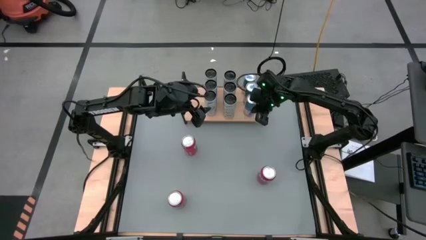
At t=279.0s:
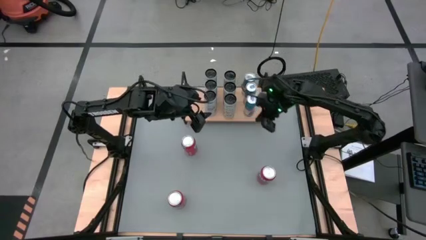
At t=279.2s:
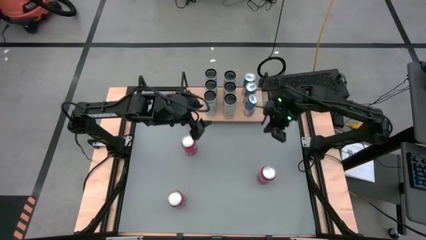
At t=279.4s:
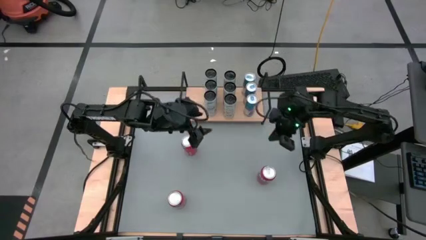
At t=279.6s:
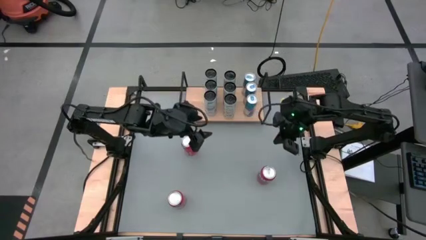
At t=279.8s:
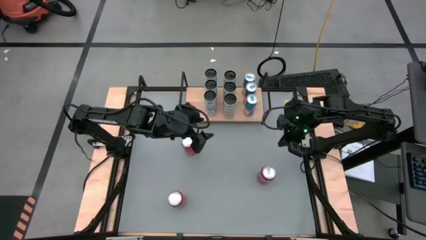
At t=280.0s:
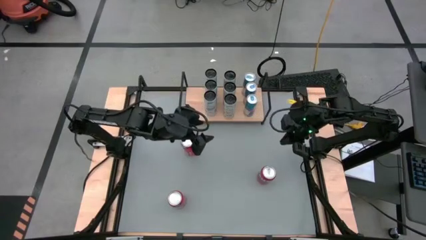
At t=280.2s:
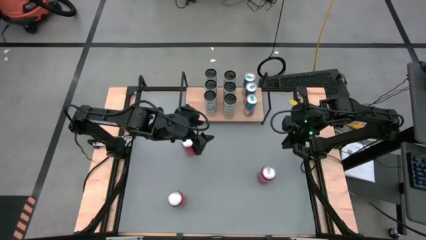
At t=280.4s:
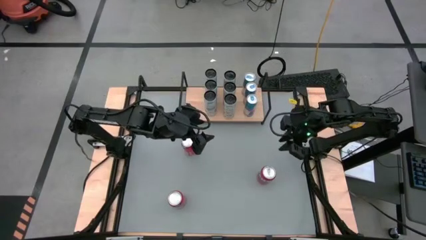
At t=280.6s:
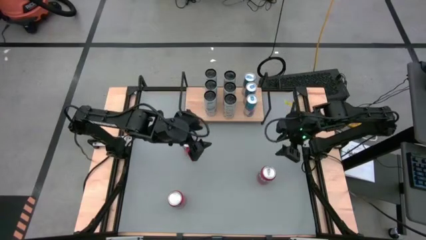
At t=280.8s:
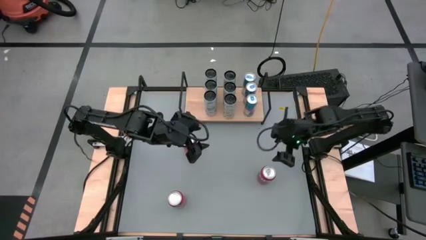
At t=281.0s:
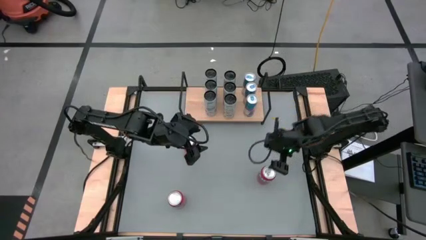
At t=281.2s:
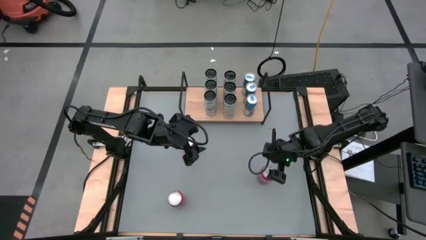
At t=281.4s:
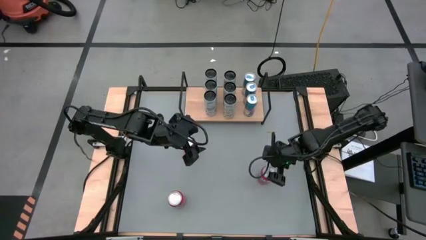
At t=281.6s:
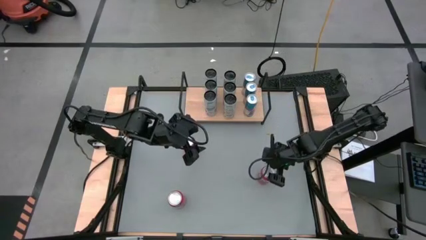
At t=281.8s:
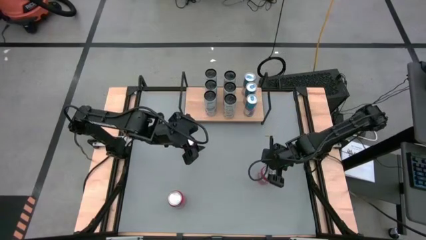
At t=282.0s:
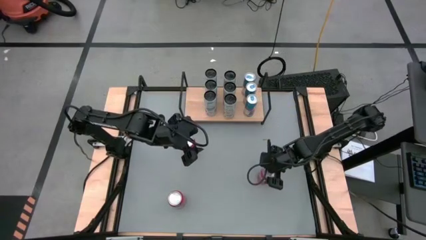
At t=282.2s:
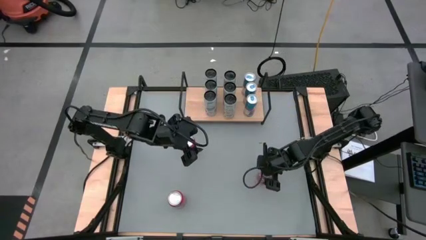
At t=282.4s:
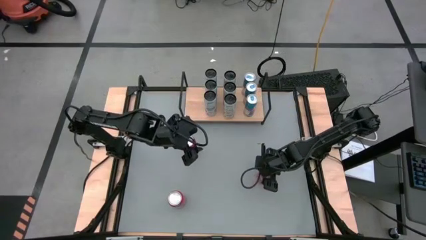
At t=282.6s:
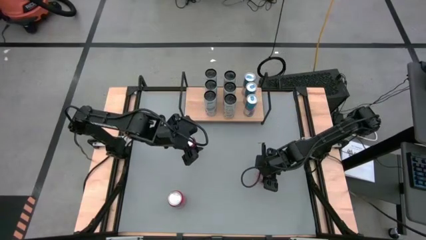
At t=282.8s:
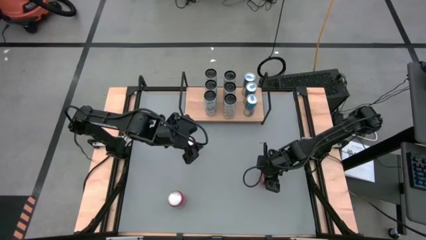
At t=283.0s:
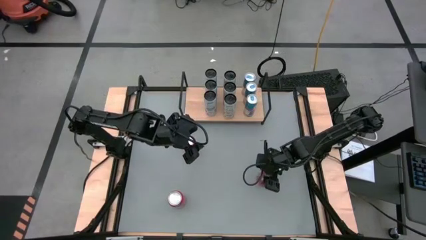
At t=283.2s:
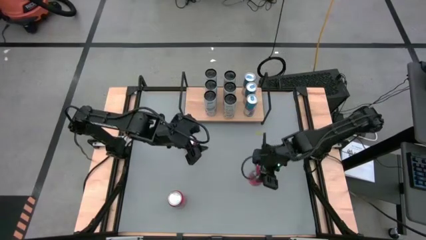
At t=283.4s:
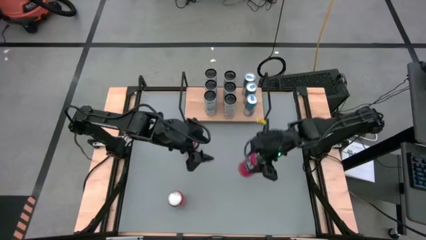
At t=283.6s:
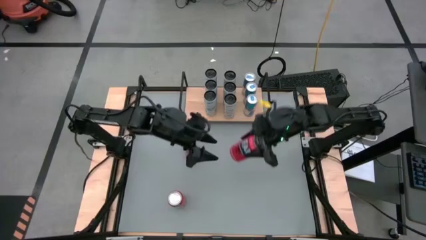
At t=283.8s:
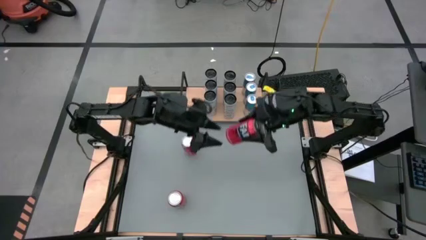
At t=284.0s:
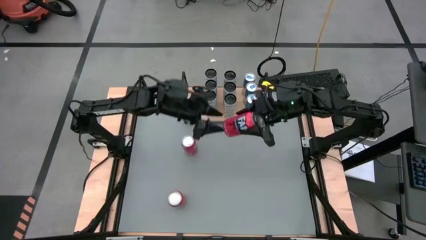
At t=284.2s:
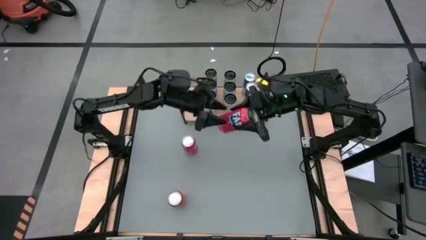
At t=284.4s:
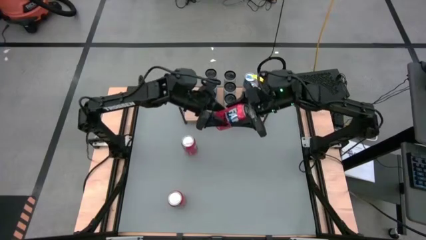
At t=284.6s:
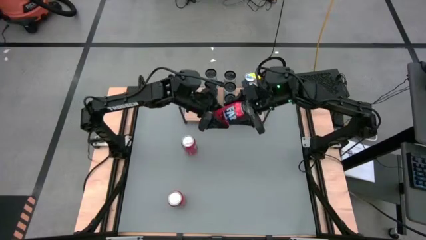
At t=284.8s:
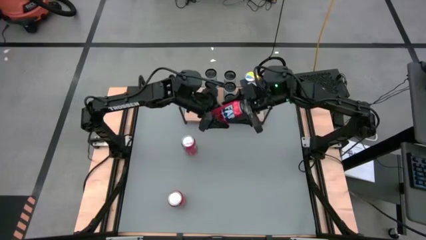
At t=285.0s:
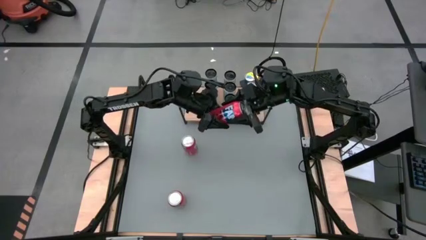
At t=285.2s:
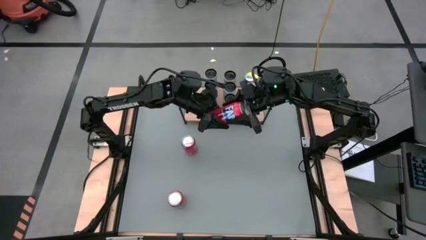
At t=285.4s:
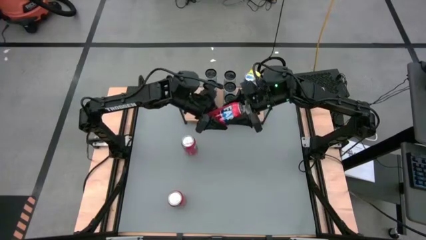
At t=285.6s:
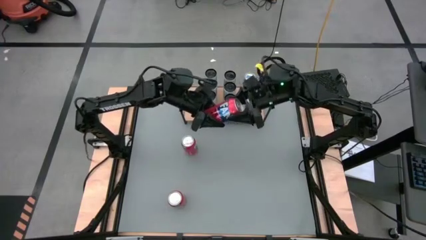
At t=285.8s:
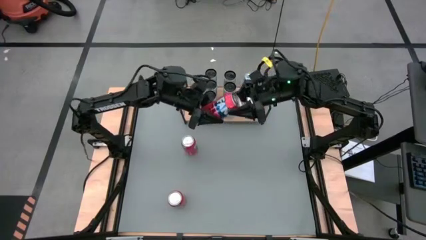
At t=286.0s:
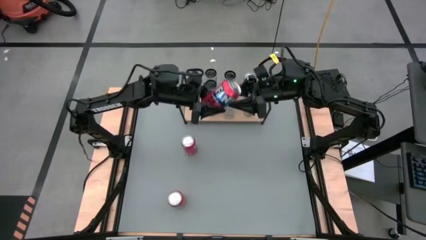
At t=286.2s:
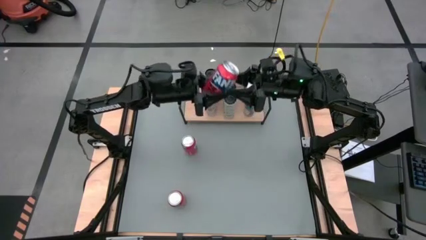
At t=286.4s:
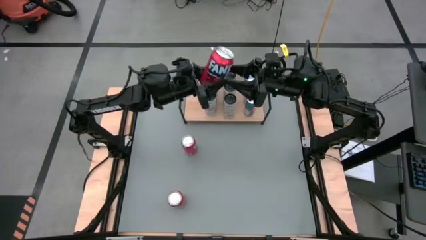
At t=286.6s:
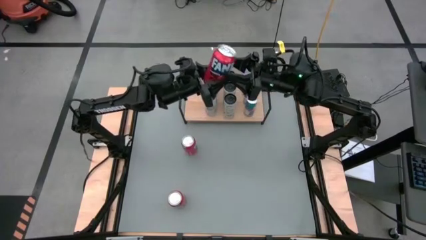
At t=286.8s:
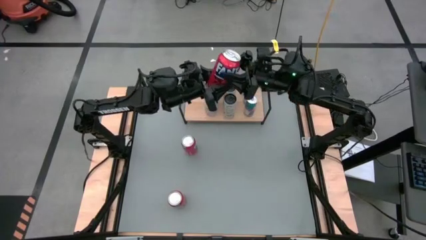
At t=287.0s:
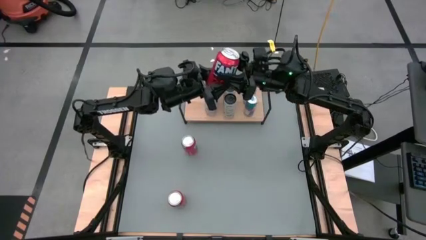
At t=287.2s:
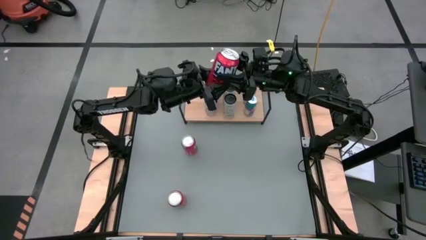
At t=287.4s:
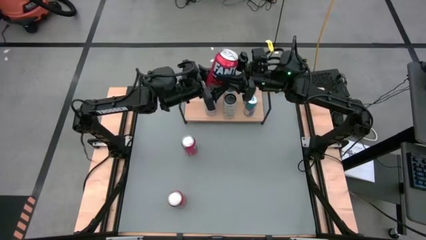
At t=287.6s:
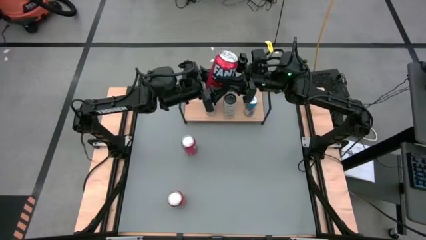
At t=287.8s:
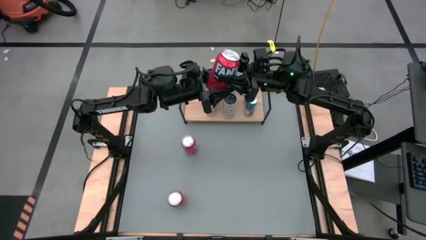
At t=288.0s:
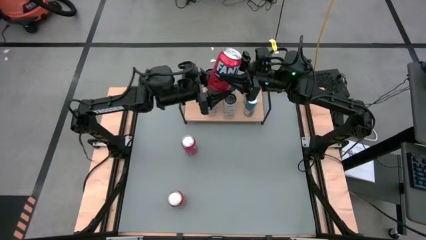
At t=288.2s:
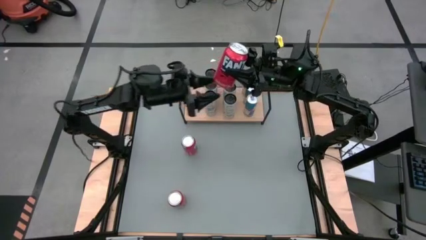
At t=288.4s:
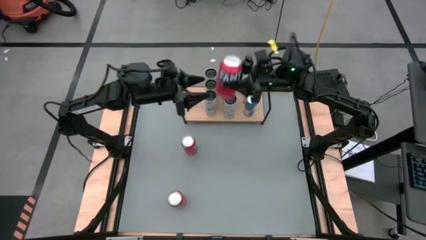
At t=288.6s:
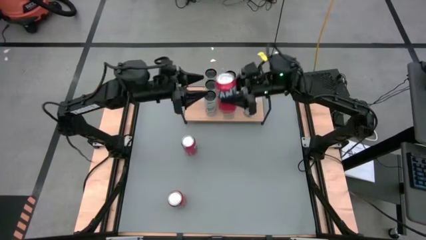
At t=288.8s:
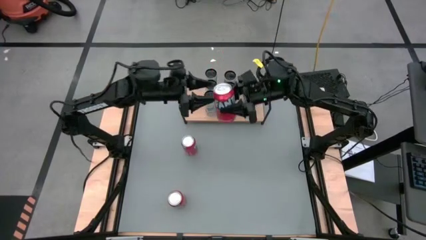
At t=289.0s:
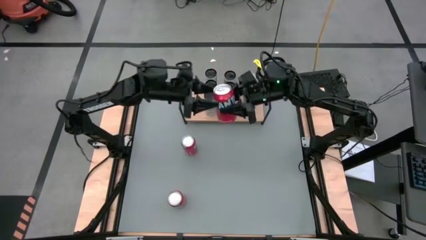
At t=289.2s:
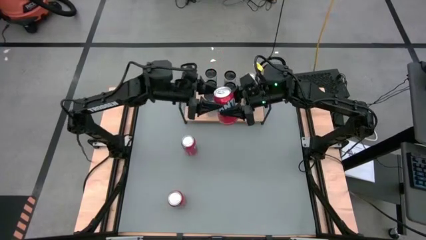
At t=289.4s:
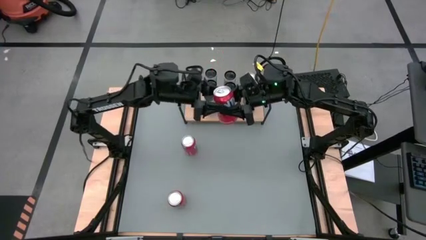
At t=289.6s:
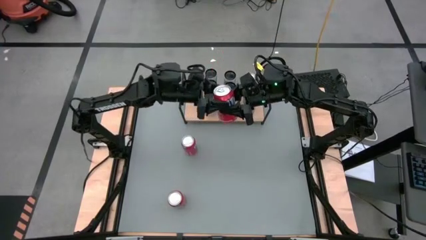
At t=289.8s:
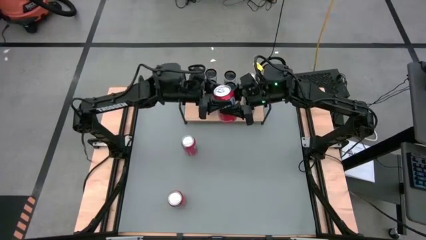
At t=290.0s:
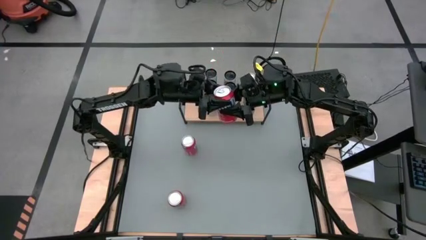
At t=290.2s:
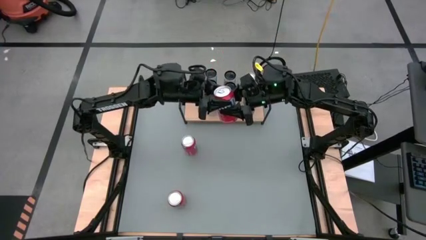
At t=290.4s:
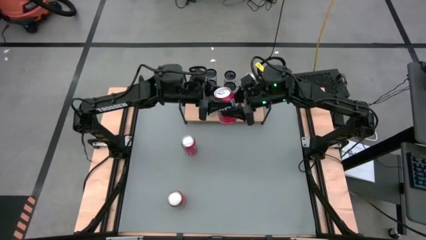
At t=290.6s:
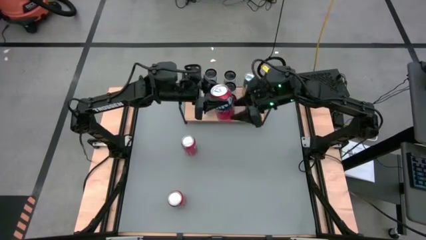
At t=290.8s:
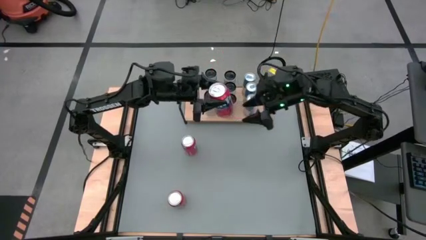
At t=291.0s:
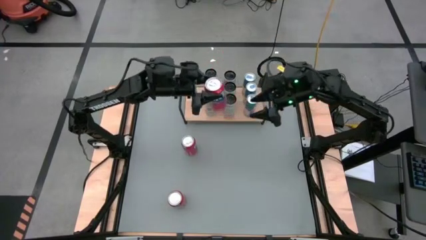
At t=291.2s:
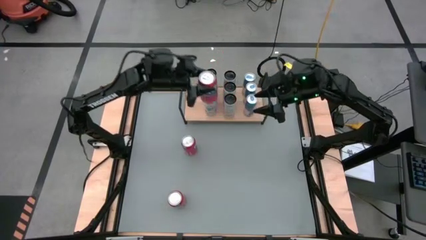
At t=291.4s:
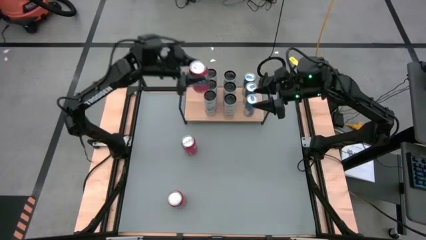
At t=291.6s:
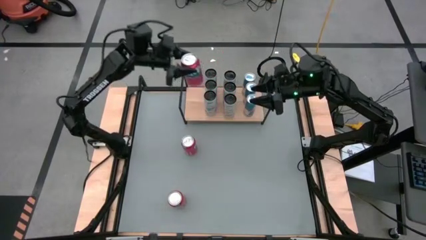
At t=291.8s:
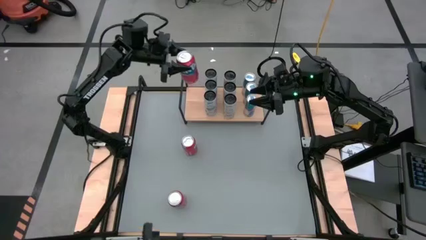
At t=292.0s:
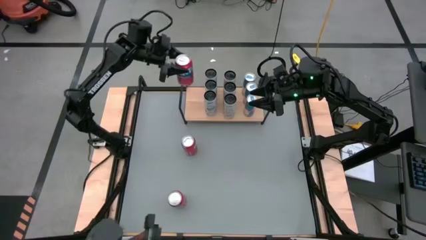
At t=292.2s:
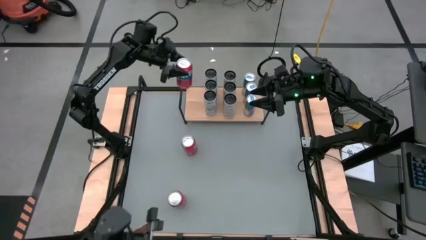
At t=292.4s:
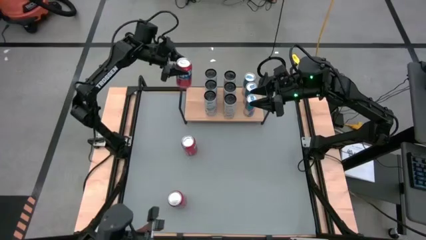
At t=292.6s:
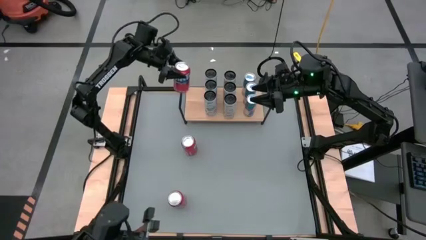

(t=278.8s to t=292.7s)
Task: Place canned beverage on shelf
Put the middle right red soda can on the shelf
